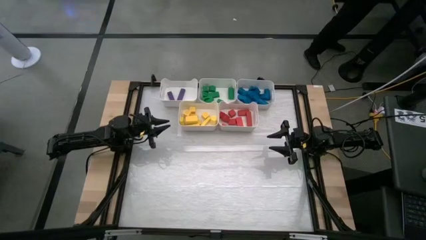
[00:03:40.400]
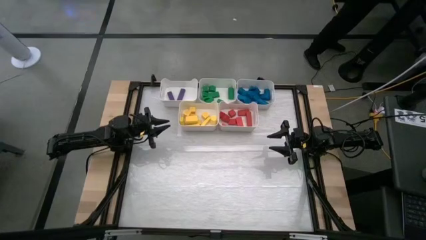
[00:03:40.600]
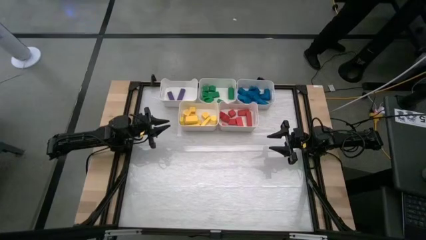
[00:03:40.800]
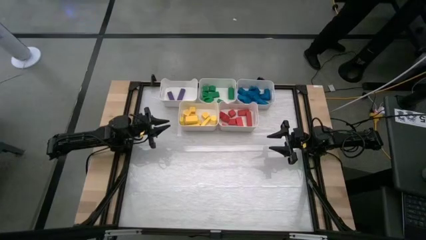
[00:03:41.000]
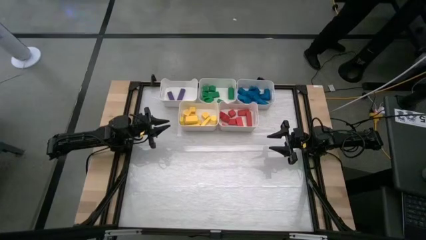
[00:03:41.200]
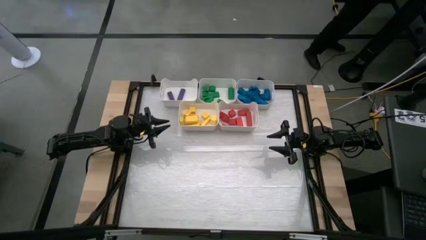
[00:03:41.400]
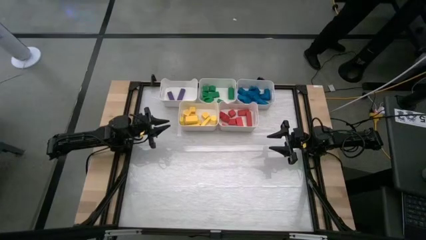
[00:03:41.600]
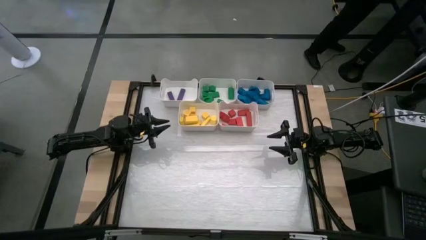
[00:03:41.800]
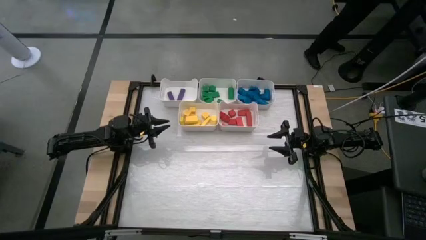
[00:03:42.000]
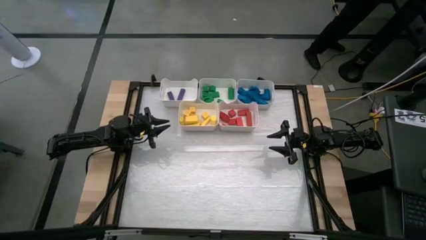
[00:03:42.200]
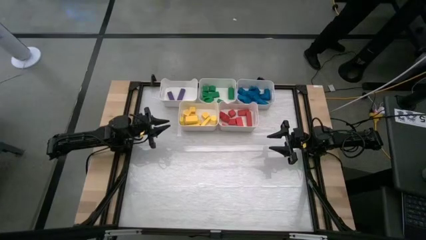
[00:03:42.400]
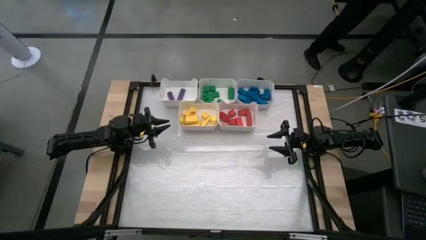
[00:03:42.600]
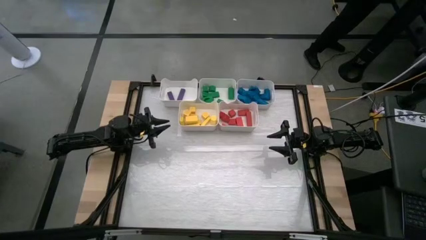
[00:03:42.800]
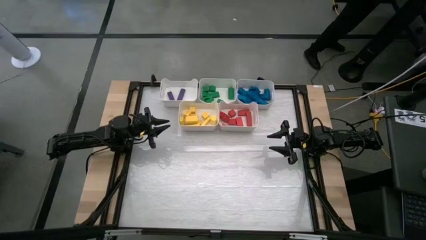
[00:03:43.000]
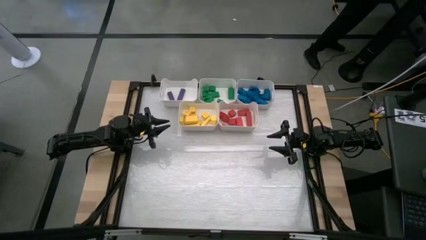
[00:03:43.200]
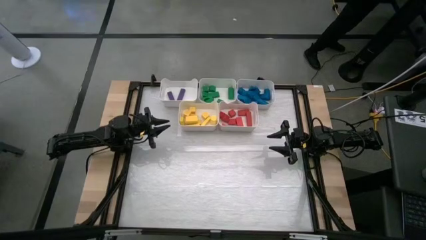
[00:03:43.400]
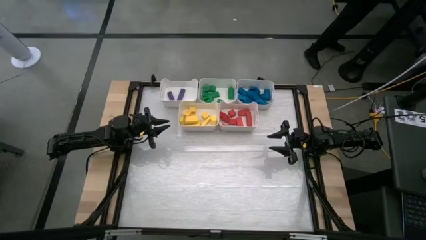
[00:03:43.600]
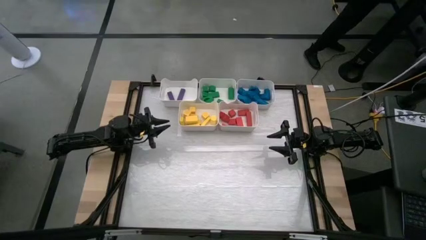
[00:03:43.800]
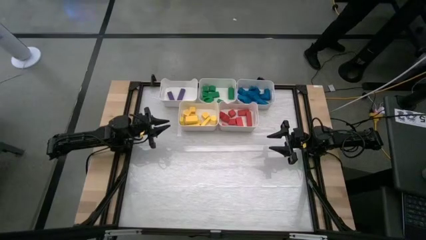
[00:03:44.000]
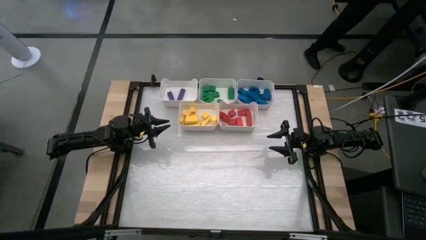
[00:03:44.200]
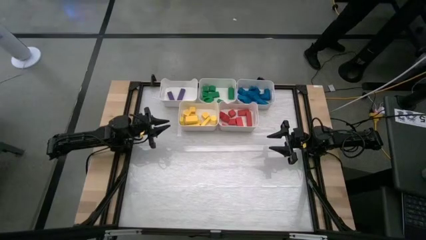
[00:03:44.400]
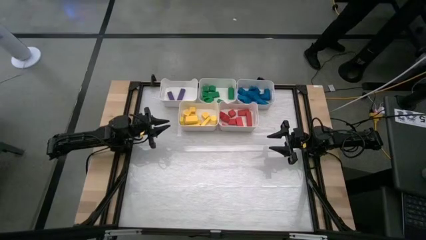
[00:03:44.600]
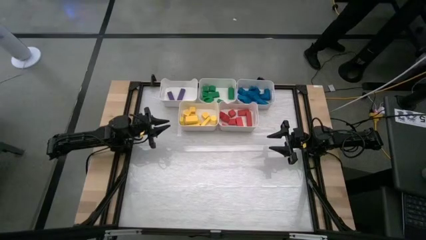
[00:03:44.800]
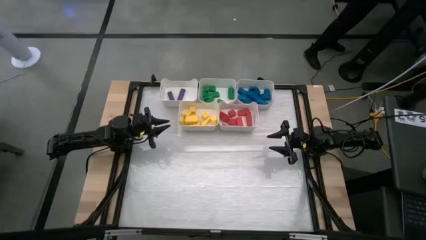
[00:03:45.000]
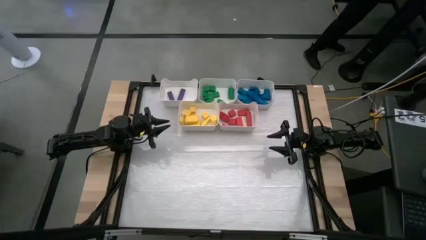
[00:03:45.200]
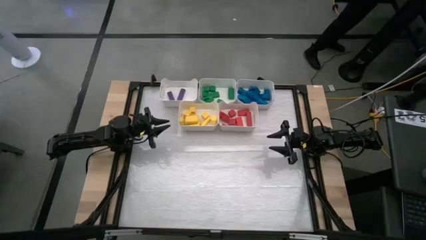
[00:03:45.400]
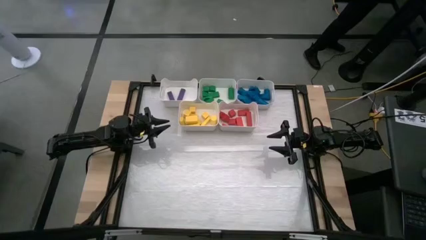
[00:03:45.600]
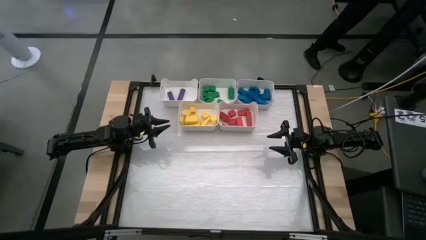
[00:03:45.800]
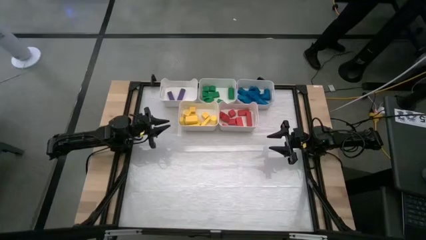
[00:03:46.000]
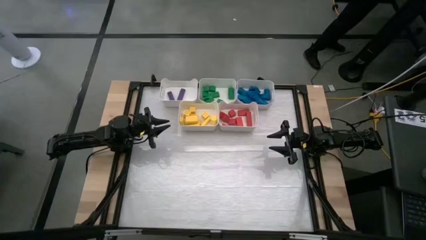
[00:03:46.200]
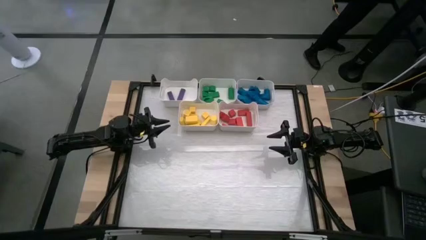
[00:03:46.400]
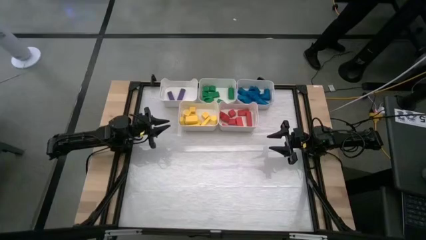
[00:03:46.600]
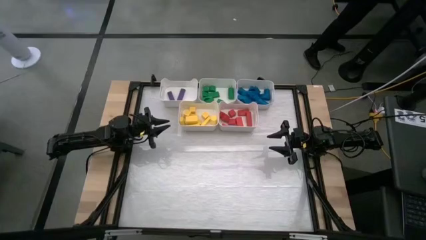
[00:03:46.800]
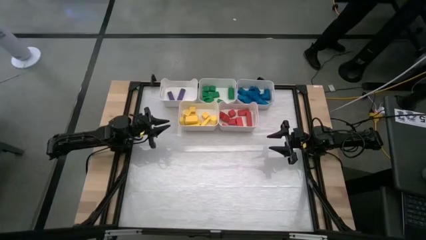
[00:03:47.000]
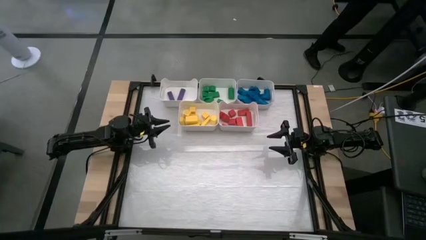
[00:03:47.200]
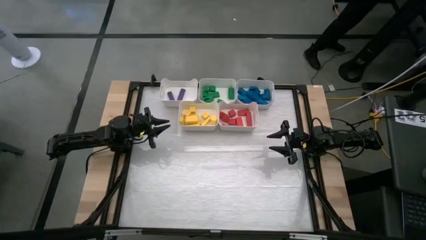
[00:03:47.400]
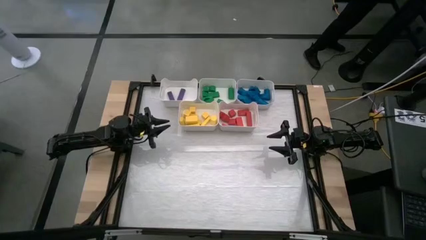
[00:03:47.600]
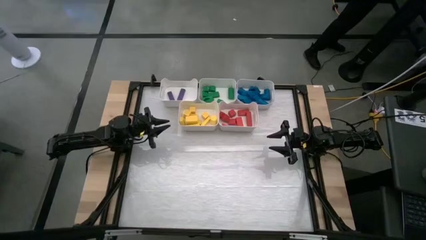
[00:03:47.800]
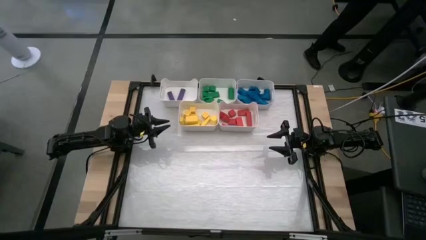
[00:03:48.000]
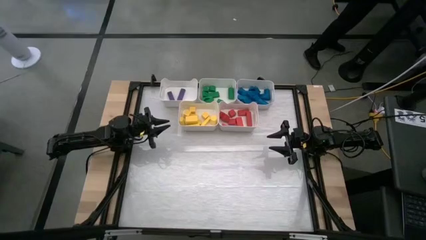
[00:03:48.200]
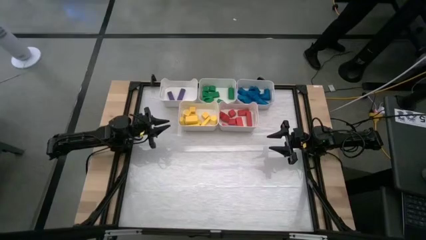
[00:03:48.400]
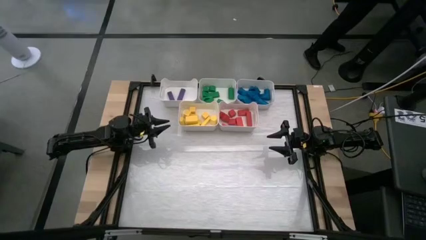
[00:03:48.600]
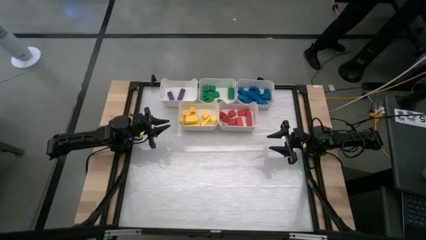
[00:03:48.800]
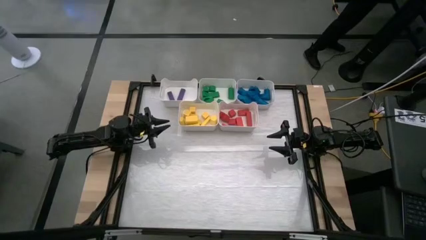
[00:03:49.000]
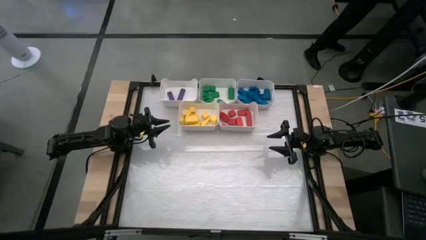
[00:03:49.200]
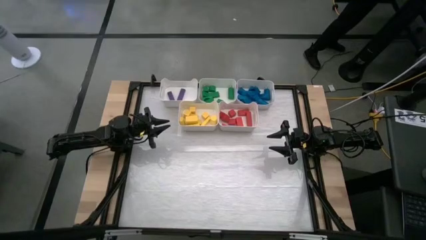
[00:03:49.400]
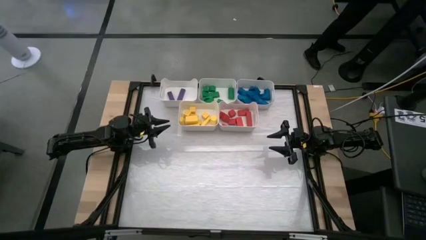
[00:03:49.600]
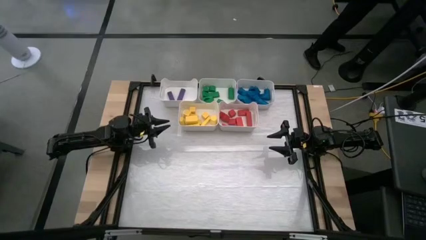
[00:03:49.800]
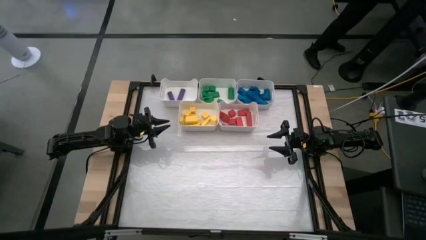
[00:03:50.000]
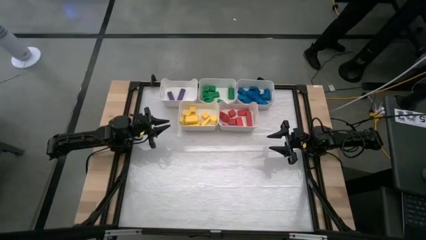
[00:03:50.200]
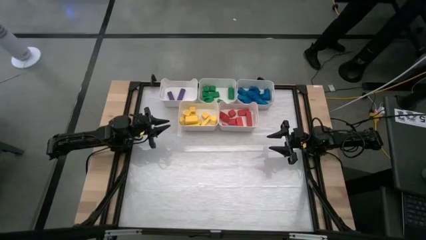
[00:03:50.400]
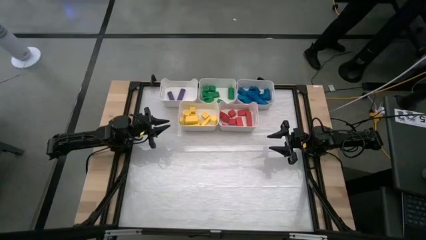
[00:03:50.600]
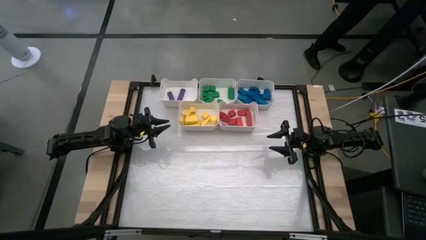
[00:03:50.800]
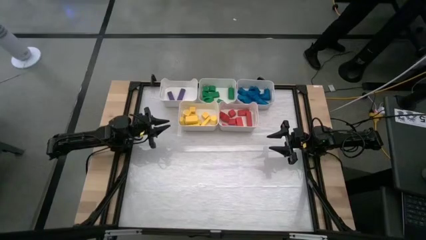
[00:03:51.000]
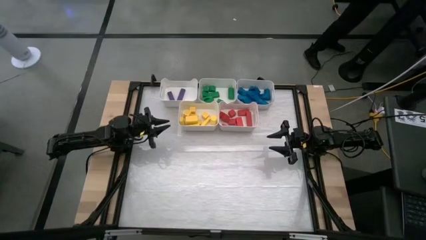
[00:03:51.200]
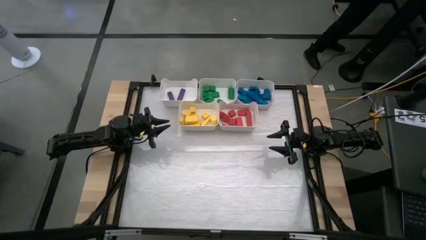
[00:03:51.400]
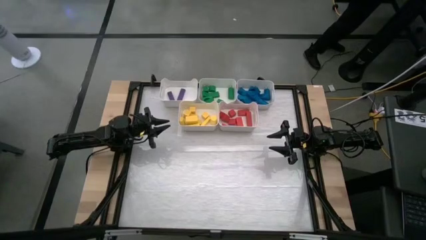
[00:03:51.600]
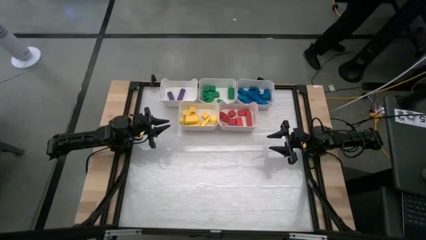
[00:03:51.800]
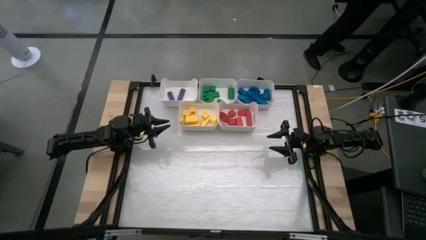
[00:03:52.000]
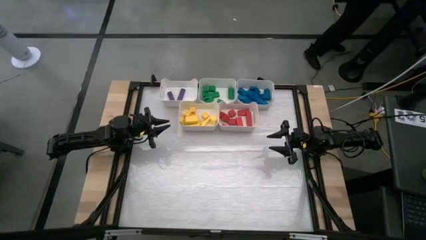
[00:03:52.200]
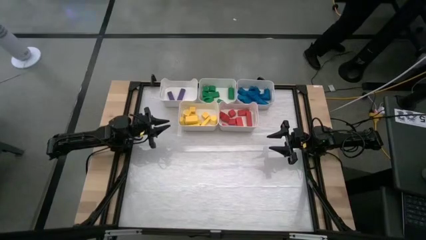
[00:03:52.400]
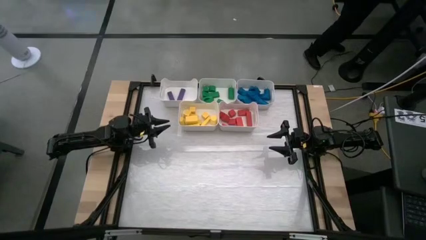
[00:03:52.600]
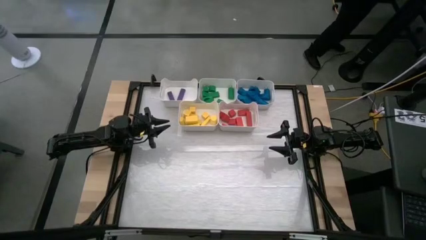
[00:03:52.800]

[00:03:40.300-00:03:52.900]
Task: Sort blocks
Return to Home Position

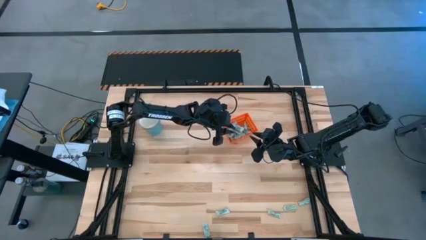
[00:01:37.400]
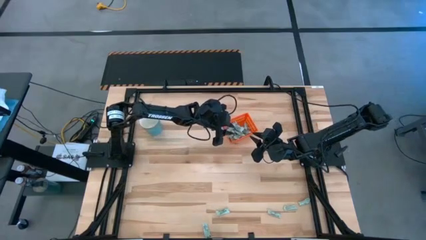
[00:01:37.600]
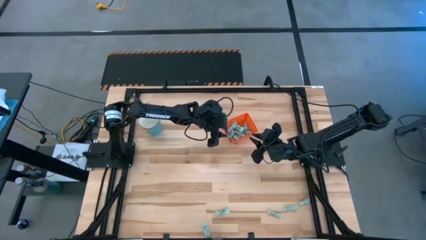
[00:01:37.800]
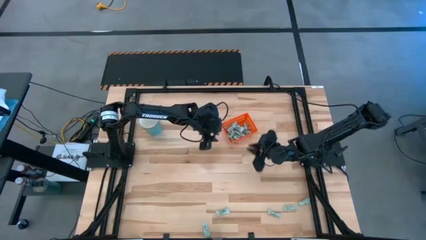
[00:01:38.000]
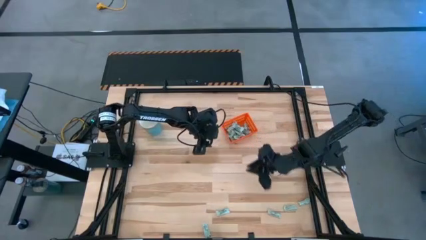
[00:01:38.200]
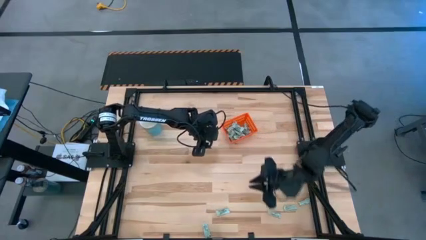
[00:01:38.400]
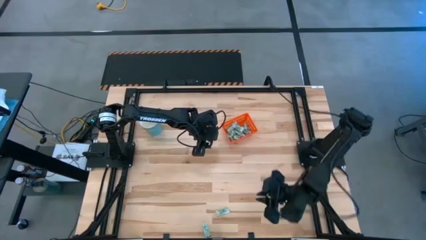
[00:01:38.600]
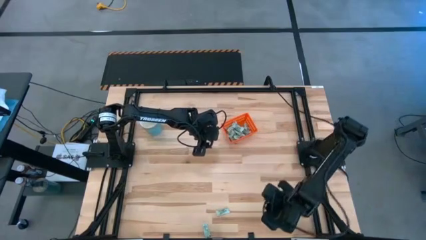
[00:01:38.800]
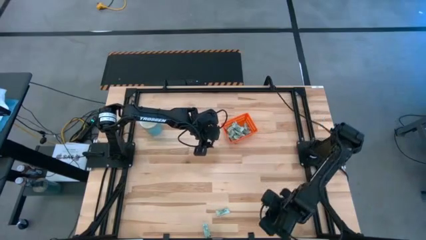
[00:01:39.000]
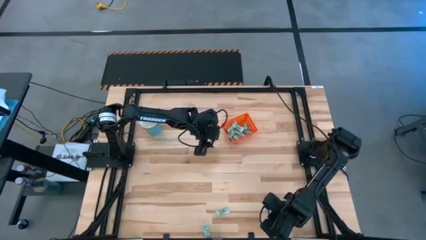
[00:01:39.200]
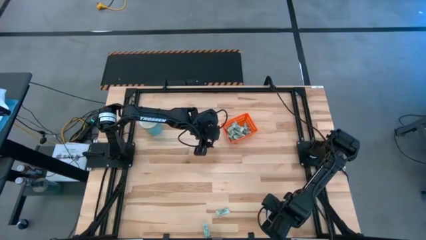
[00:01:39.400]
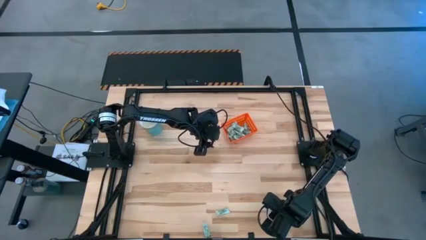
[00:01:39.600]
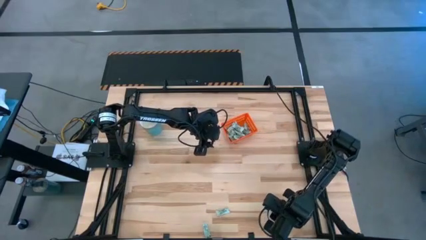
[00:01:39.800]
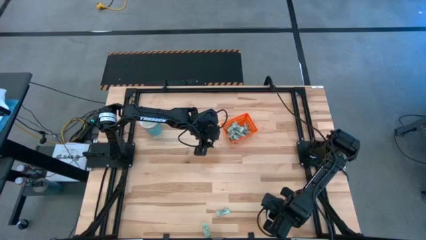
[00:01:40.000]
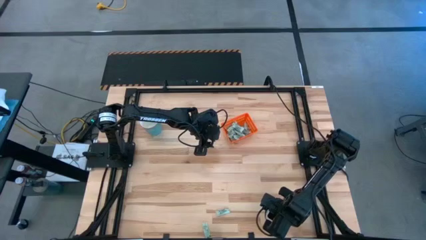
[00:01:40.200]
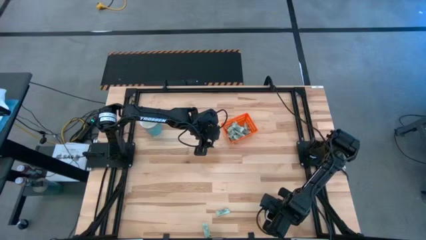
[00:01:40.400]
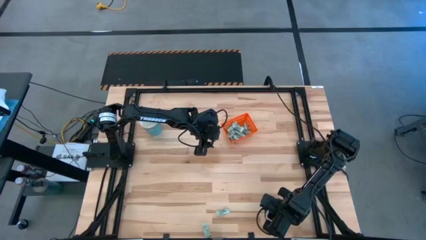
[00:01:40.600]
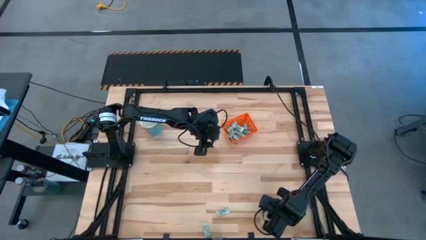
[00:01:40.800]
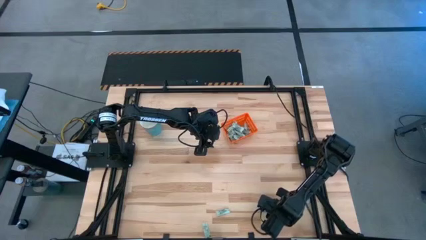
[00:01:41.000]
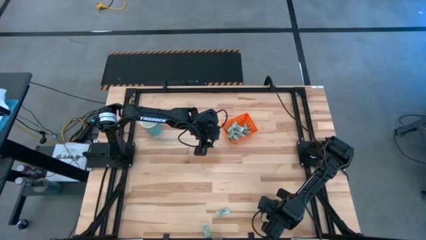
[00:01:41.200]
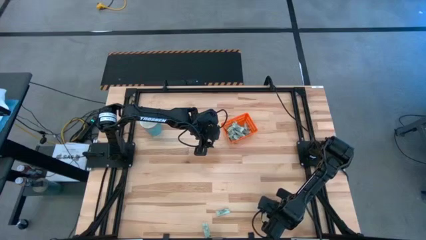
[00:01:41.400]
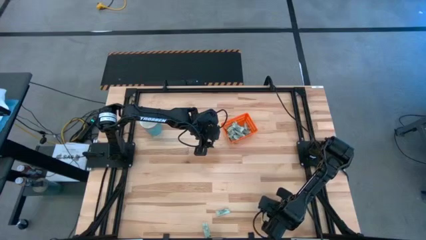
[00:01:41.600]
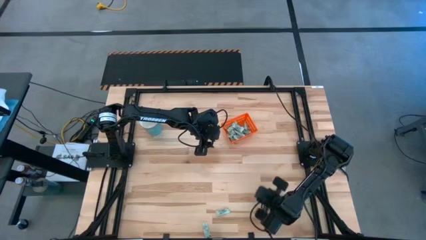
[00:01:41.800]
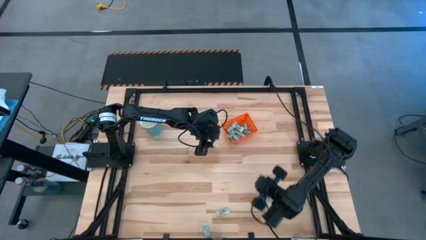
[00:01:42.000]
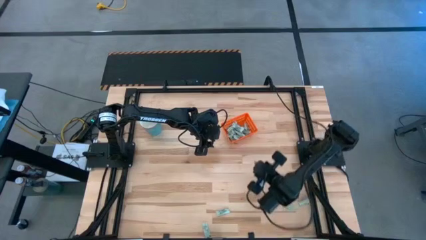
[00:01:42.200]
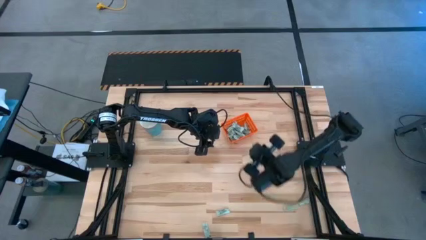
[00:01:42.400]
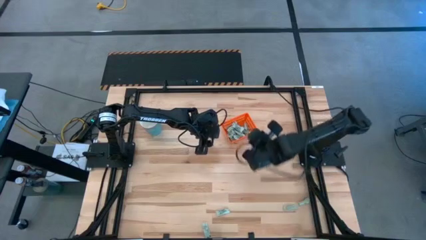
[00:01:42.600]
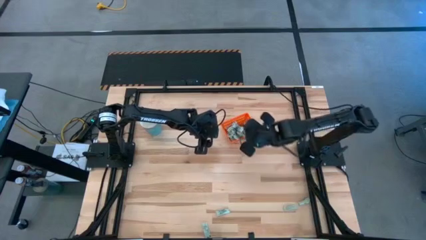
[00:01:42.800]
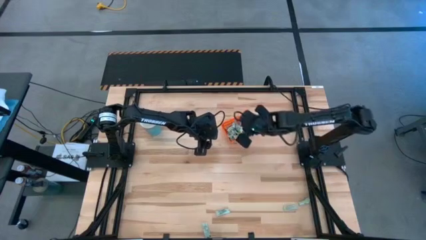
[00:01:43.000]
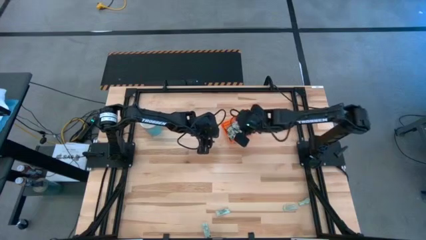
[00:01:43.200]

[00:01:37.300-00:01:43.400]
Task: Pick and place Stevia / Truvia into bins
Put the stevia packet into the orange bin
